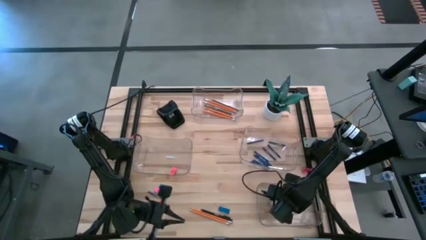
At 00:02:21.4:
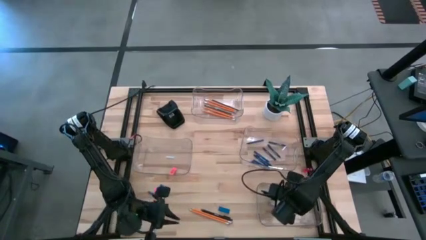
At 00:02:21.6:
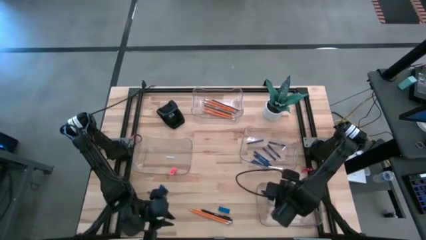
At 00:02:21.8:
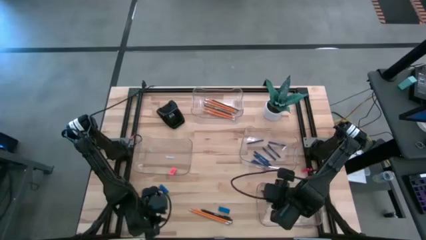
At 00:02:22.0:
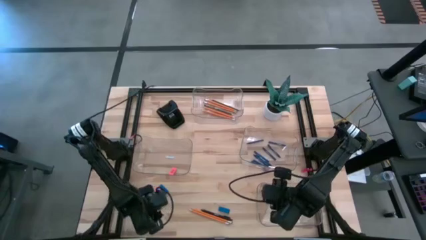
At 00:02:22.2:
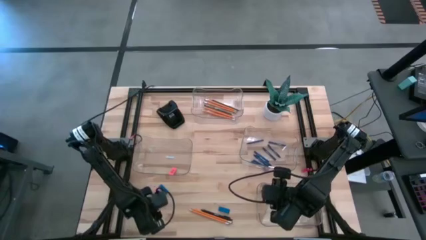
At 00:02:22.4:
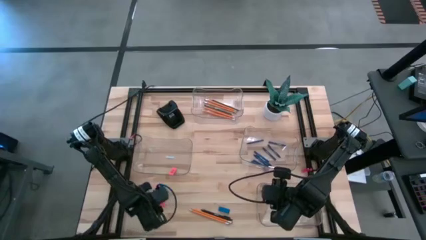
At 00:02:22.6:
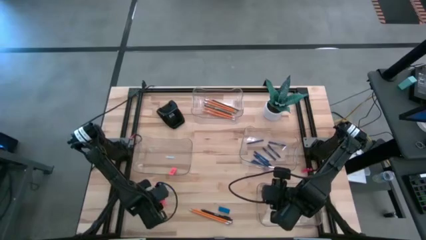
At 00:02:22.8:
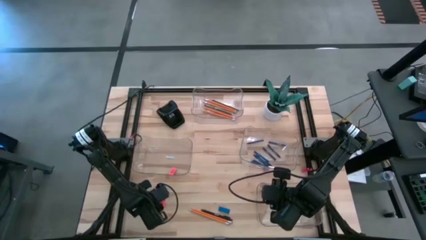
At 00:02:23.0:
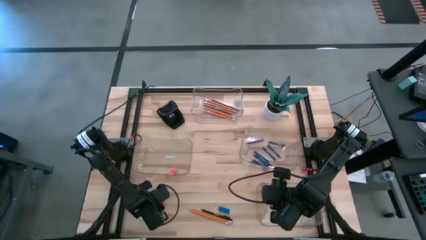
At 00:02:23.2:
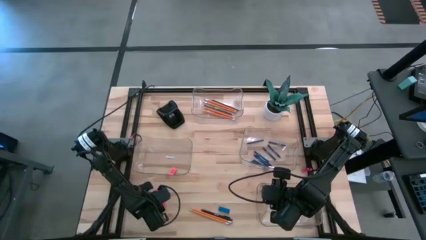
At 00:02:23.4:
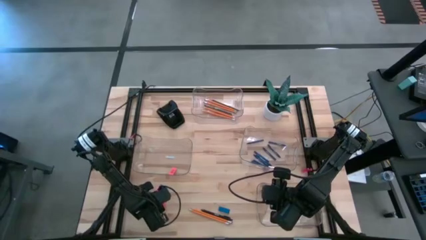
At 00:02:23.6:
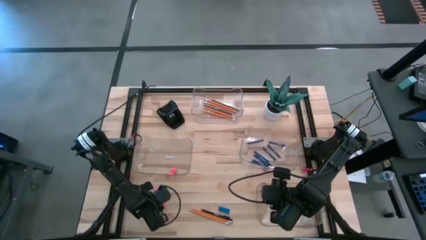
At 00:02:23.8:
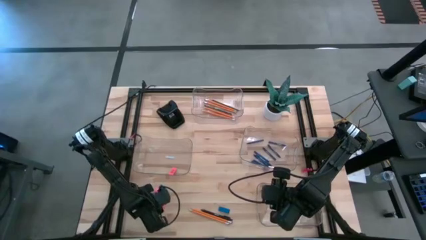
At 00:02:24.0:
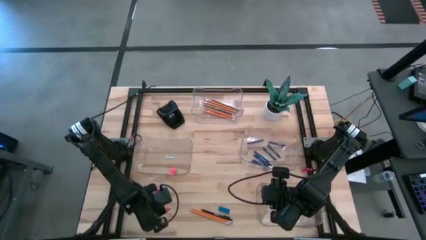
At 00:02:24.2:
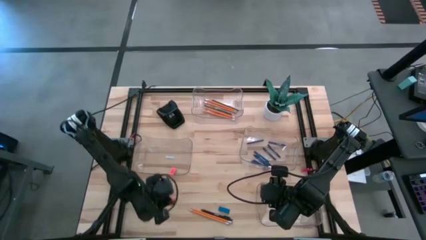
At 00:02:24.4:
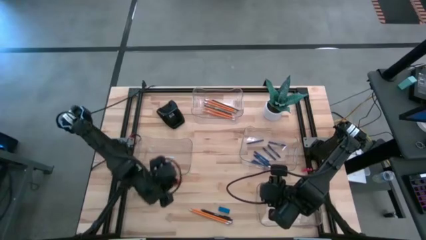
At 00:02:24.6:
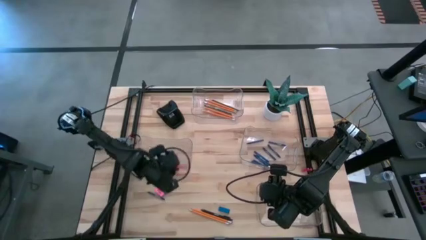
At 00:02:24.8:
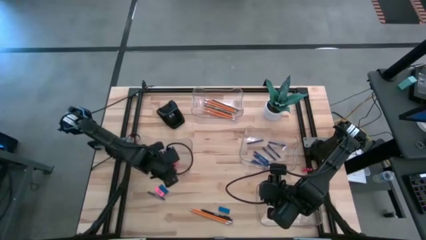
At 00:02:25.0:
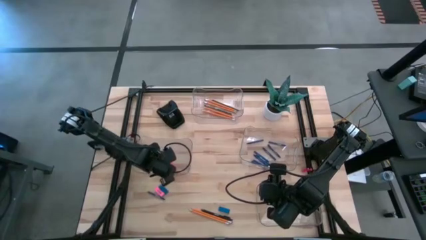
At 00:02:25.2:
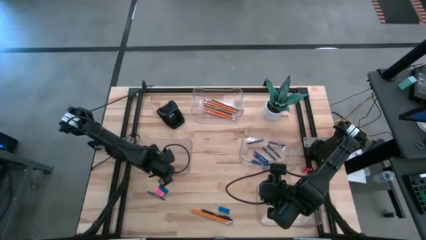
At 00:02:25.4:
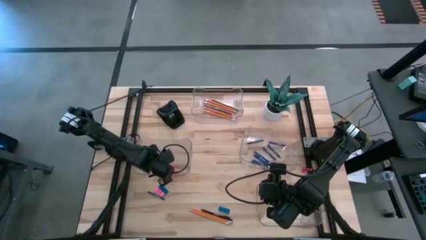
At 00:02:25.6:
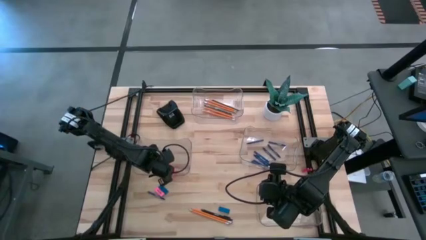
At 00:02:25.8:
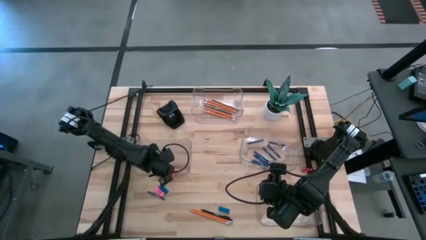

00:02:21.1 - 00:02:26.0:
Task: Sort crayons/erasers/pens/pencils in bins
Put the orange eraser into the middle left transparent bin

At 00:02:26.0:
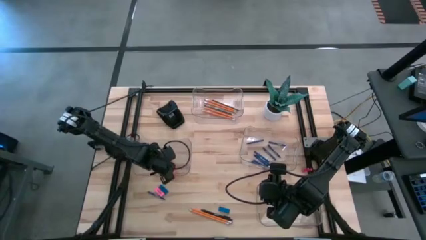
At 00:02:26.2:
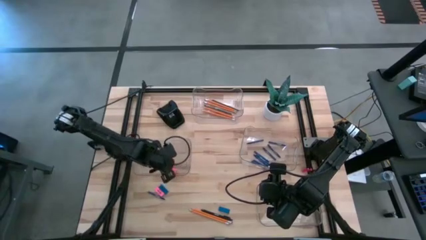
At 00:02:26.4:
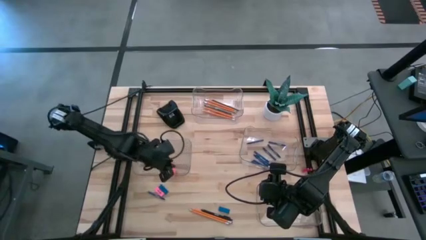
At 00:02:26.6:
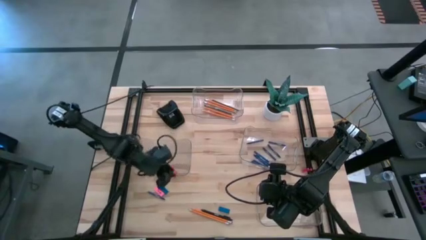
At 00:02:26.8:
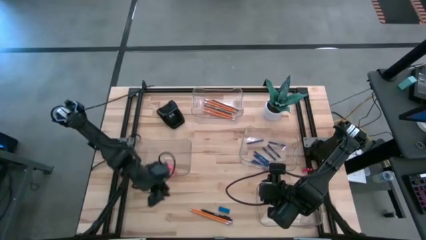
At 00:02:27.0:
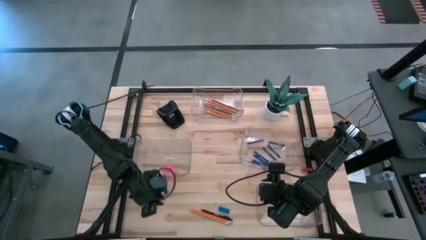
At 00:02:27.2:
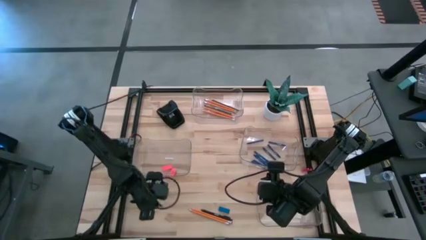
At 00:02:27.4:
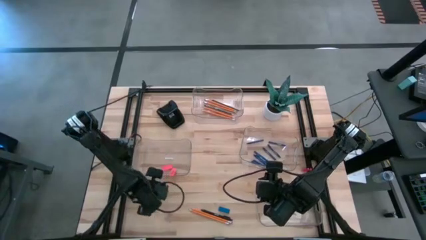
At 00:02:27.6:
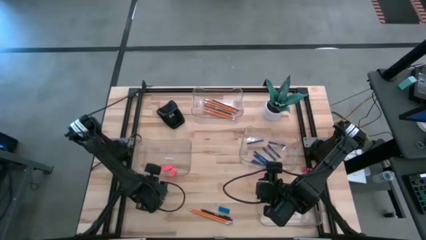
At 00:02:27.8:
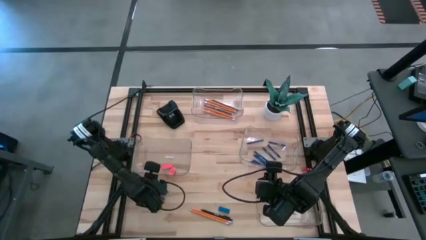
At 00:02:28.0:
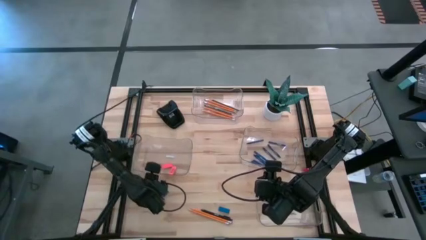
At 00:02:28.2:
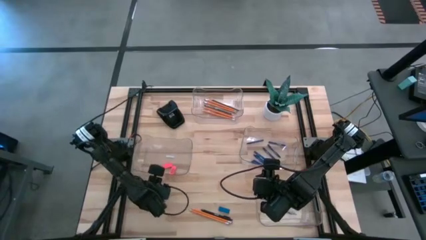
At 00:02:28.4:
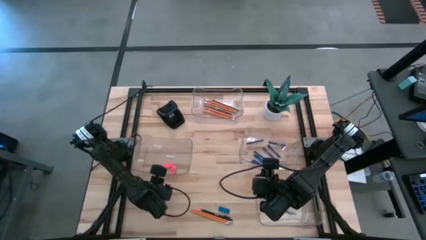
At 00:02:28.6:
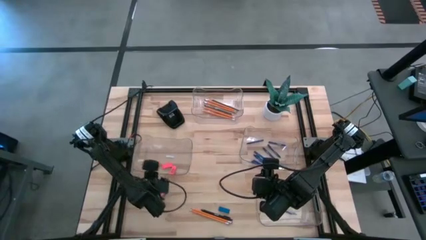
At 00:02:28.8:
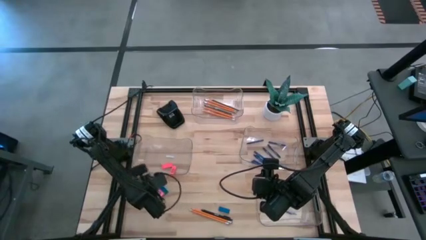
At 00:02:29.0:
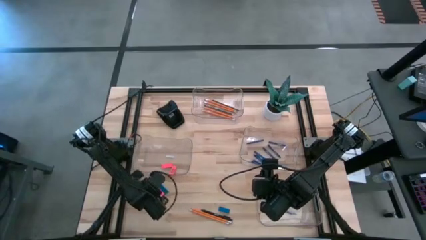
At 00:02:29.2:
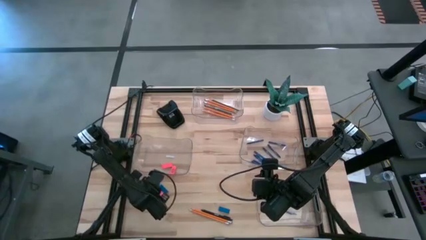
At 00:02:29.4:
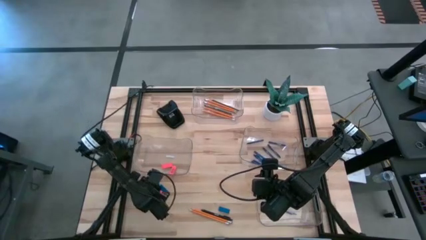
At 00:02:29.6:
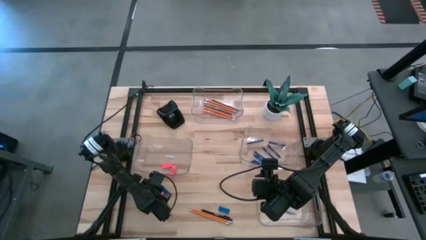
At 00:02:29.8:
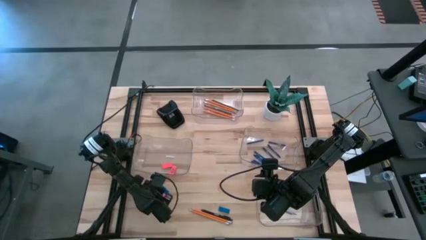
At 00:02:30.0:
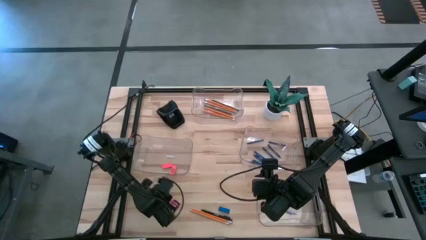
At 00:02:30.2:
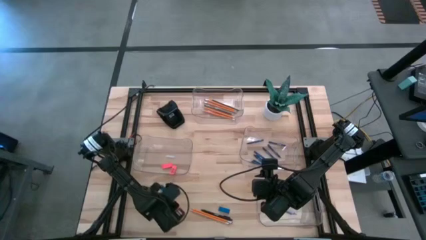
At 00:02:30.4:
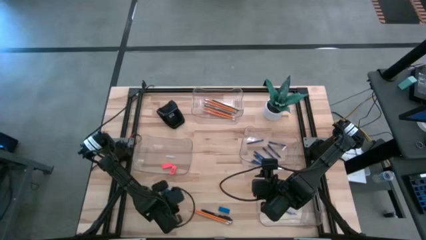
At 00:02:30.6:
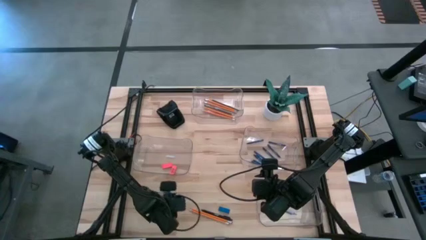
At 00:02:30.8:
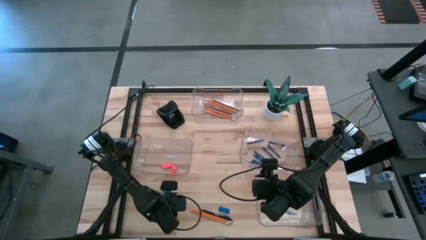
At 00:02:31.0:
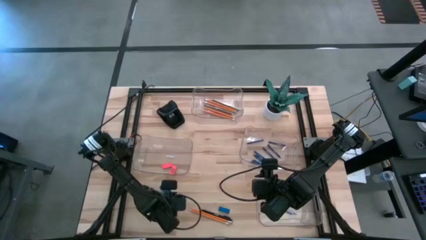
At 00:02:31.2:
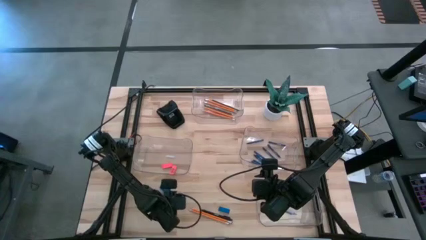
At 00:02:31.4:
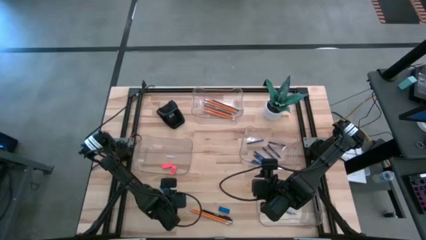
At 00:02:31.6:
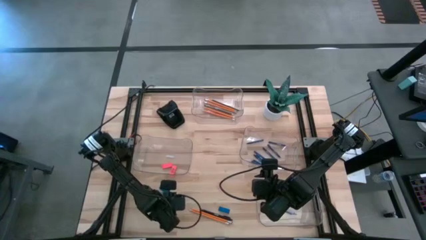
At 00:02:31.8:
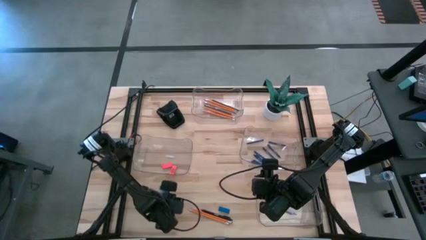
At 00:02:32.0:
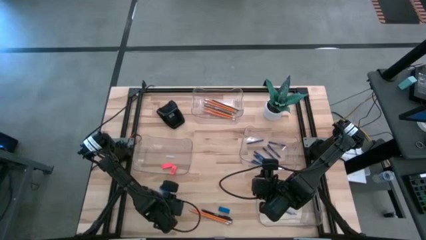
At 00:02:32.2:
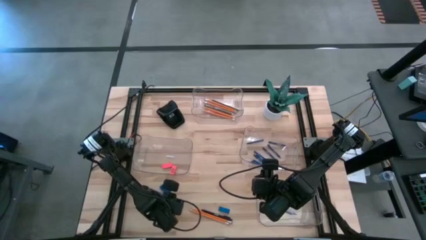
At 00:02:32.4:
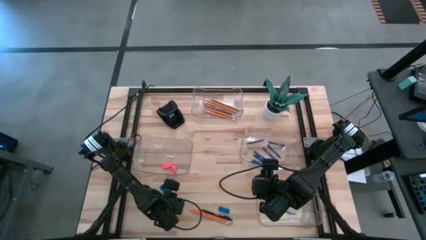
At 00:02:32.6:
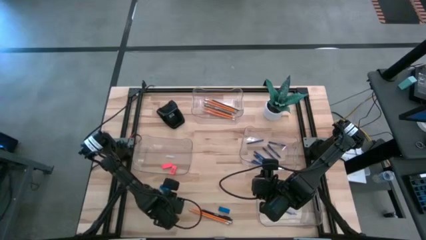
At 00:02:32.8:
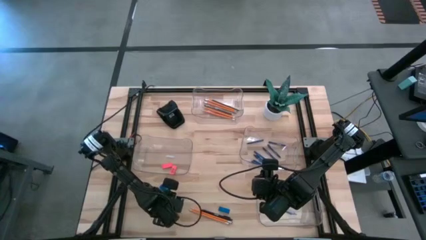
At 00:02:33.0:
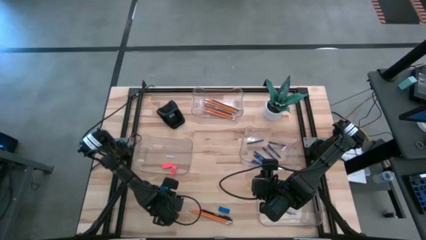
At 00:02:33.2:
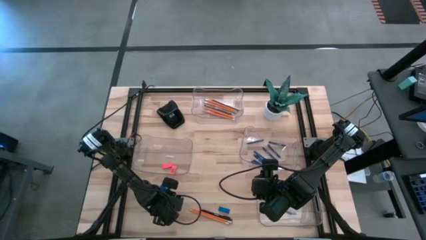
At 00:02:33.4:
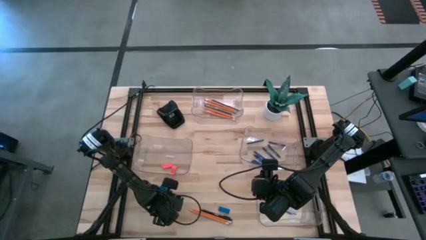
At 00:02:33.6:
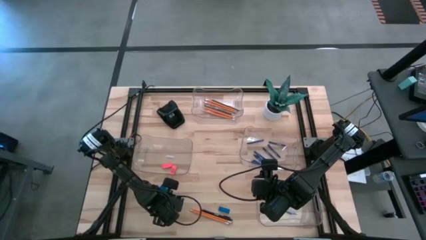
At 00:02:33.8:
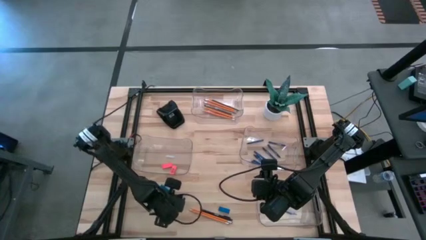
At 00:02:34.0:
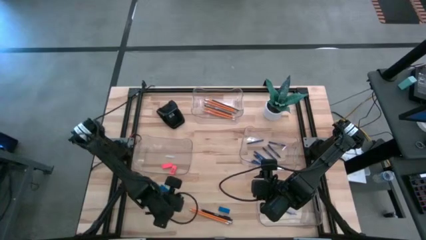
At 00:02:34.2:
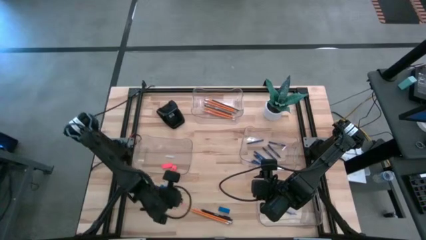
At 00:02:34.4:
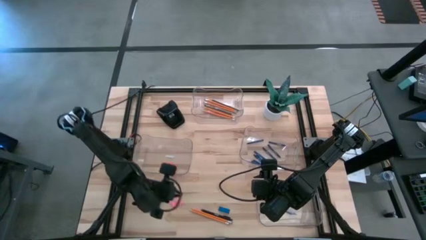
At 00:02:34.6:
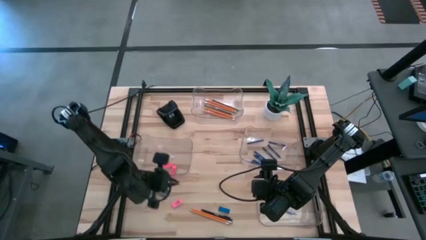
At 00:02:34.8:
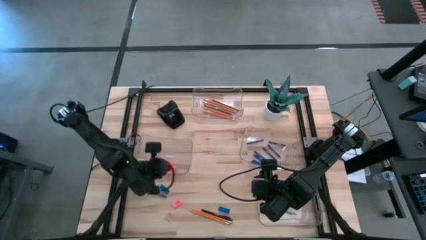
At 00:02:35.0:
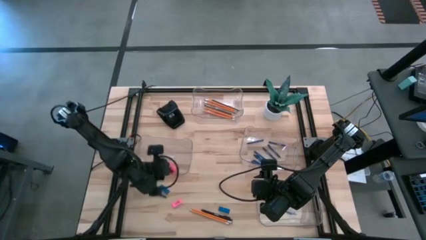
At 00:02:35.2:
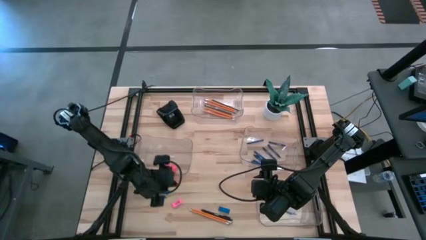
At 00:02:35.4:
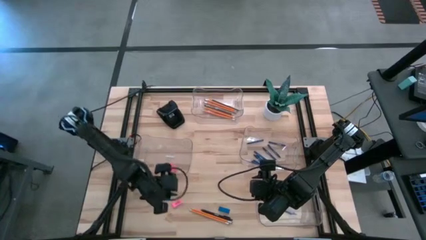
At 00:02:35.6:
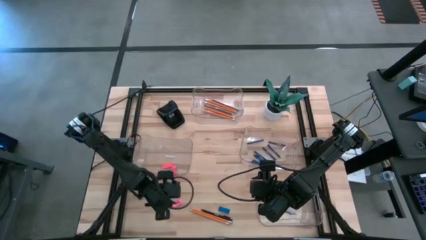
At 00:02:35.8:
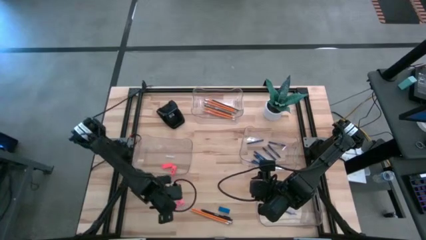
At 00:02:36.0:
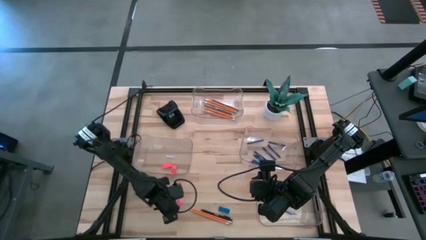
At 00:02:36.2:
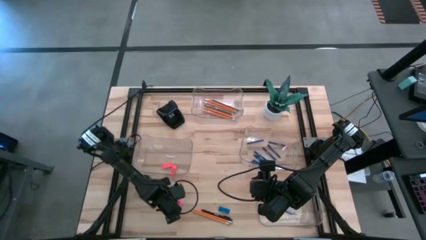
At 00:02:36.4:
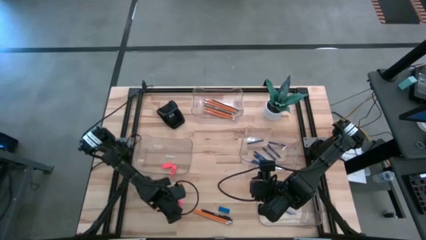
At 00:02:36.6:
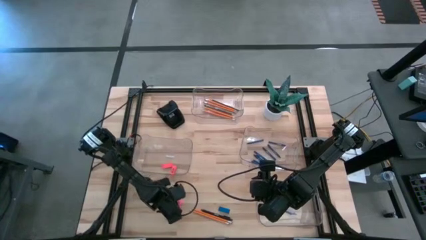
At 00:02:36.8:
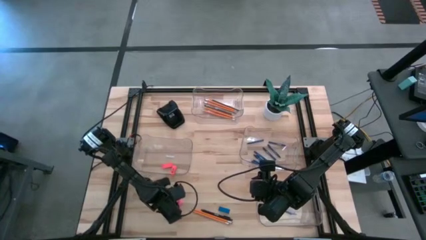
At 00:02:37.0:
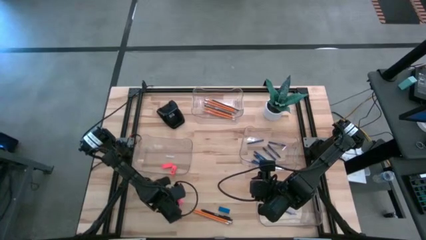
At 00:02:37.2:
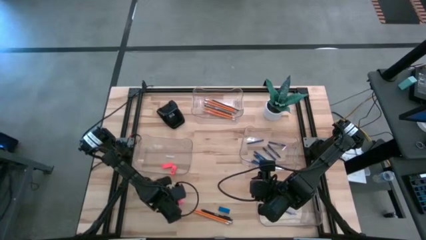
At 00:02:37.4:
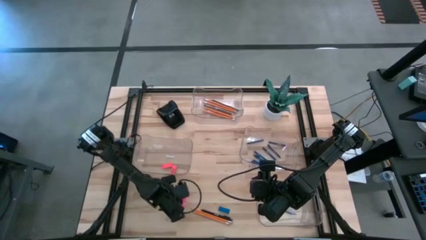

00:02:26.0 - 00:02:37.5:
Put the pink eraser into the middle left transparent bin

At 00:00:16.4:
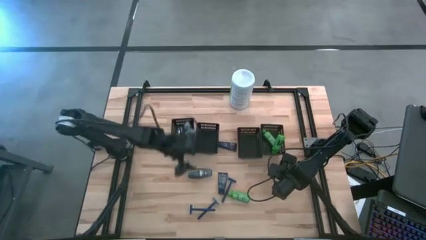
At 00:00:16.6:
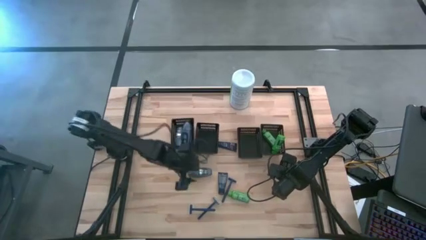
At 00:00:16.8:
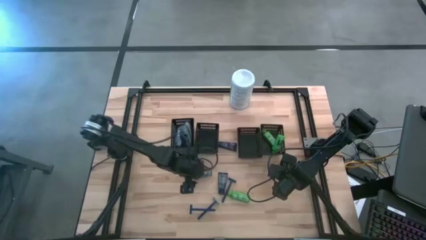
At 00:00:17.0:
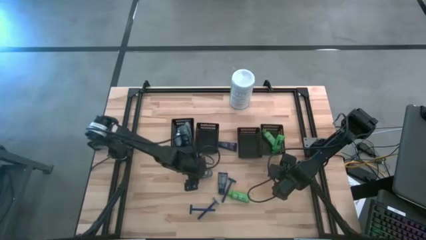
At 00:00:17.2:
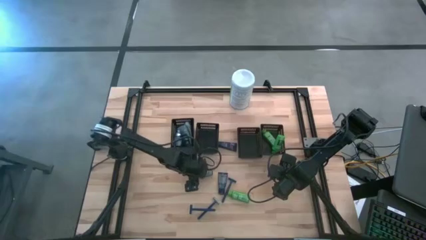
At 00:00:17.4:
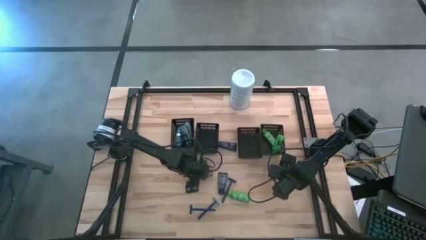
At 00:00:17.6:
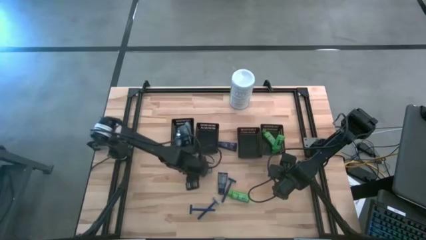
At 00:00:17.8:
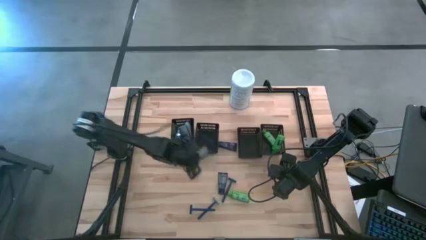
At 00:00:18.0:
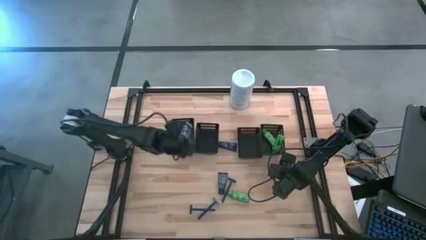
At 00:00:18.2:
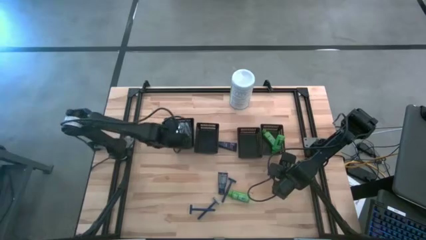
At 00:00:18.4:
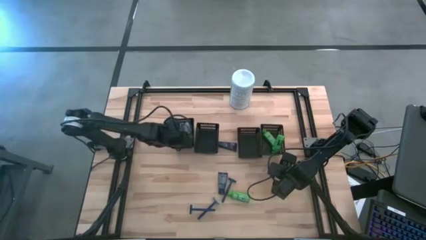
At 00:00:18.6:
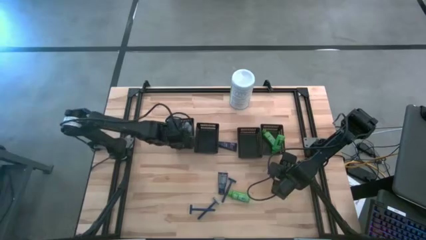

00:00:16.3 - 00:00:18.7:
Task: Pick & Place Travel size toiletries
Put the gray deodorant into the left black bin
